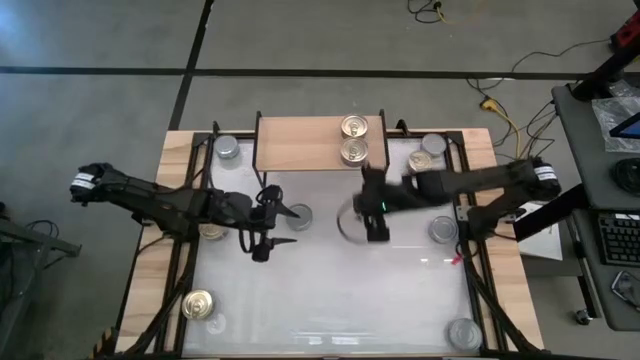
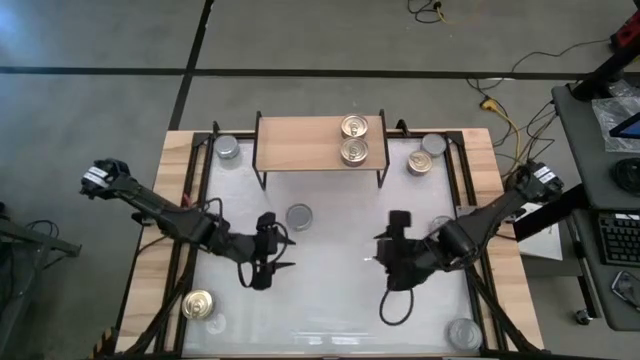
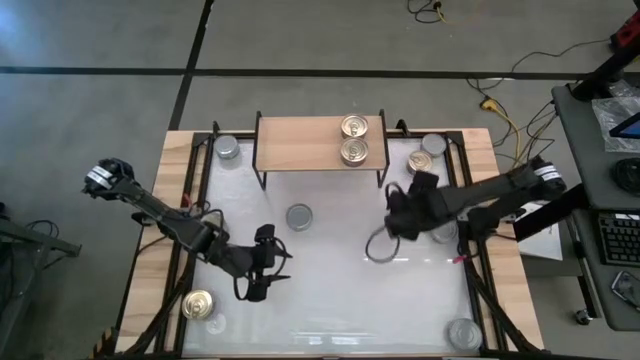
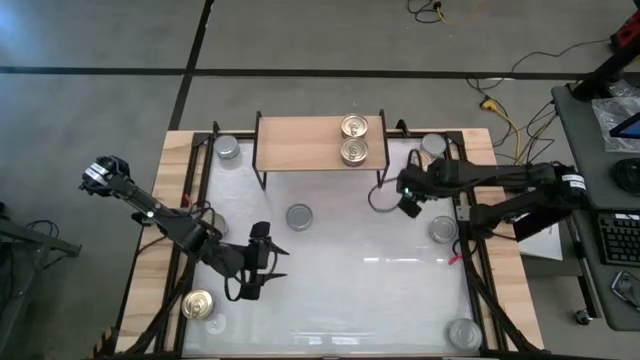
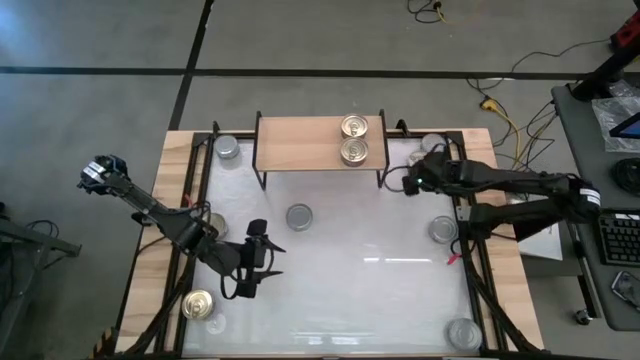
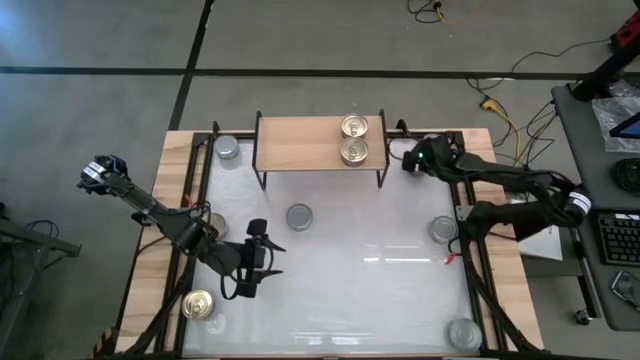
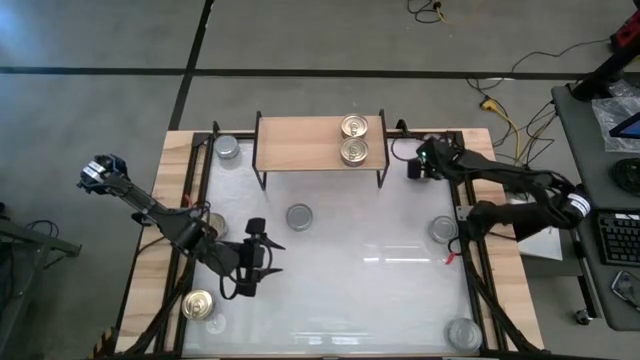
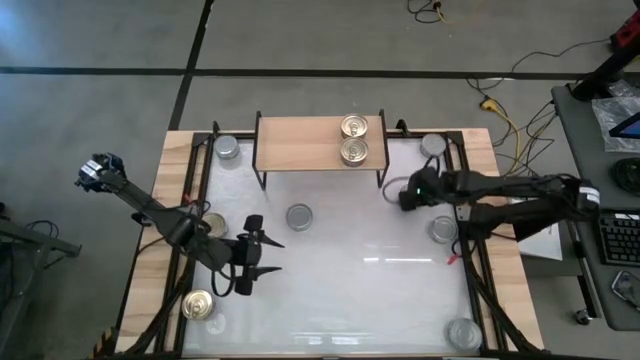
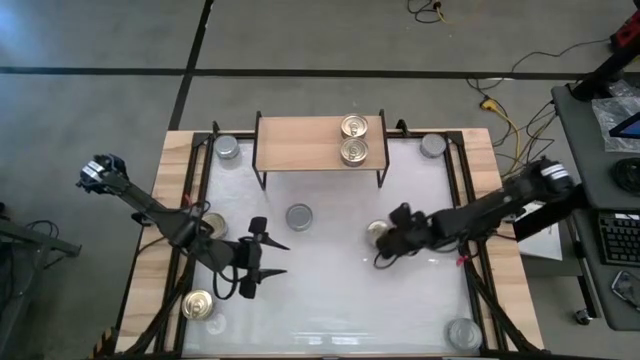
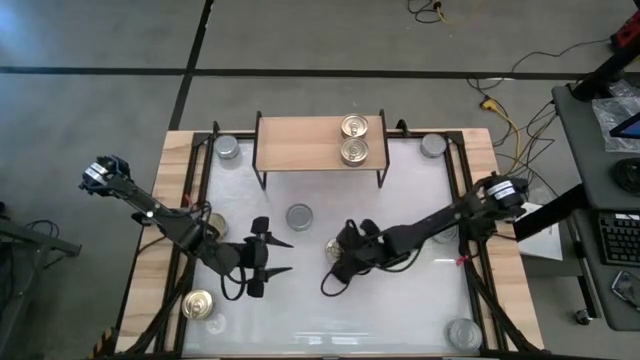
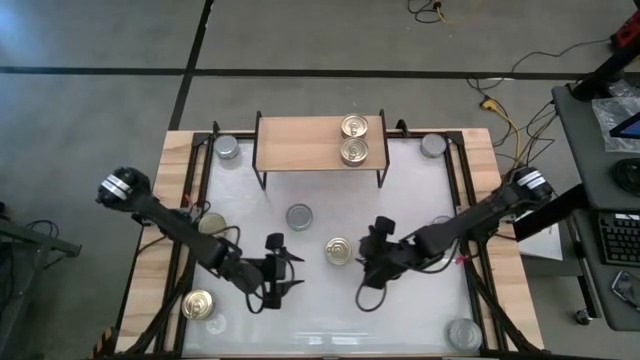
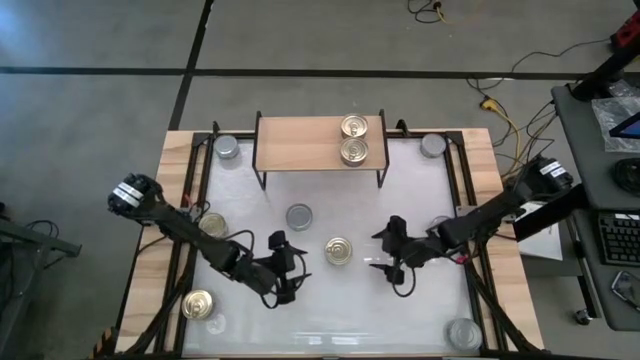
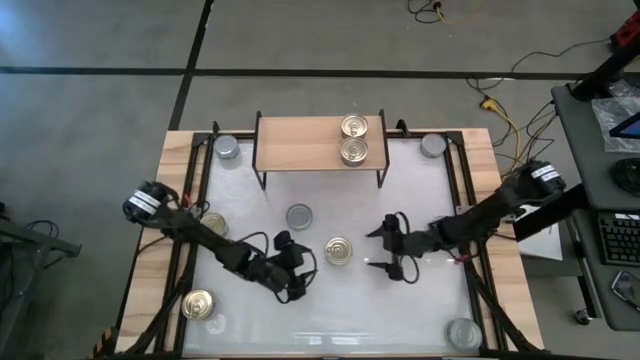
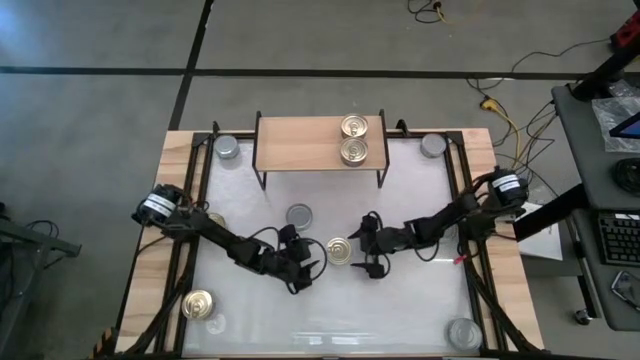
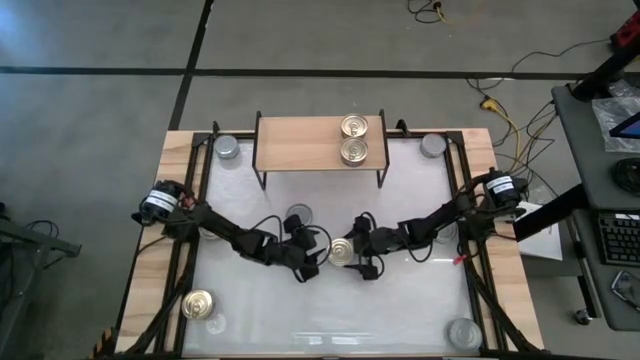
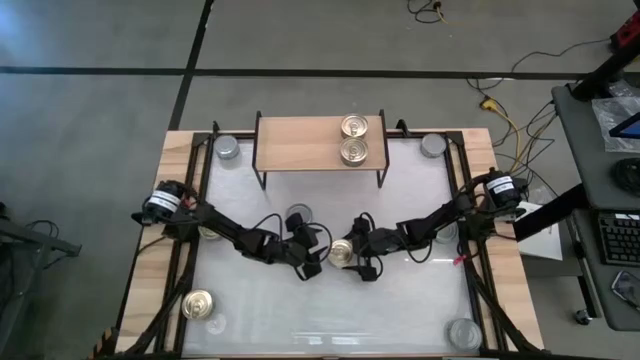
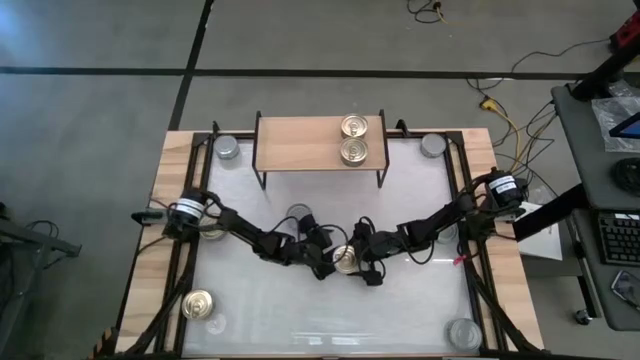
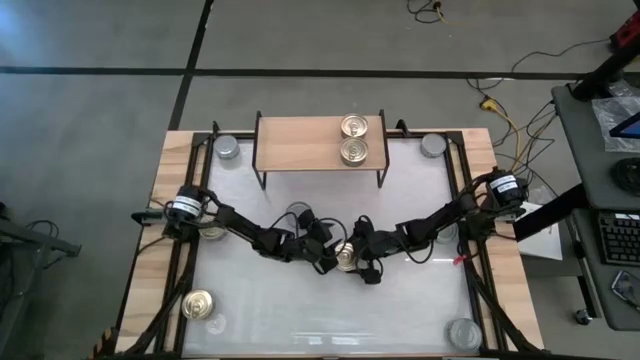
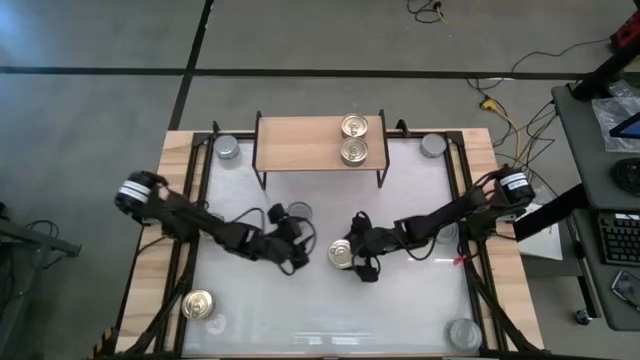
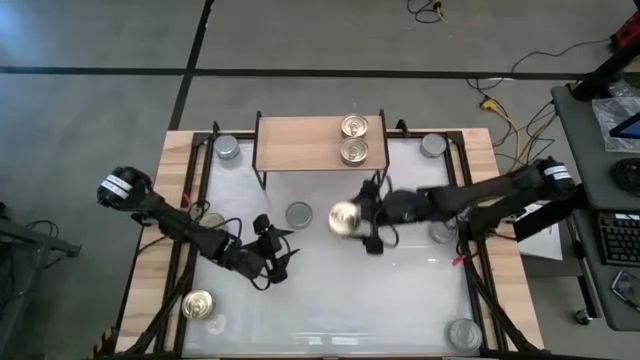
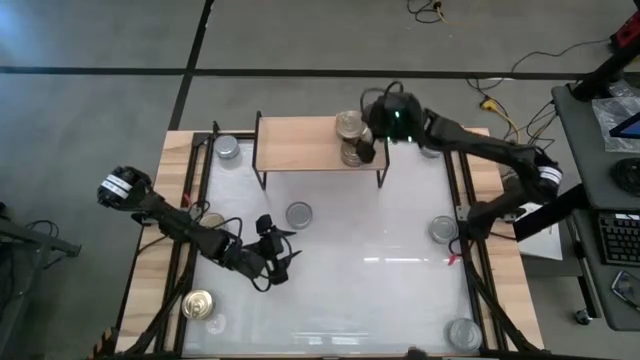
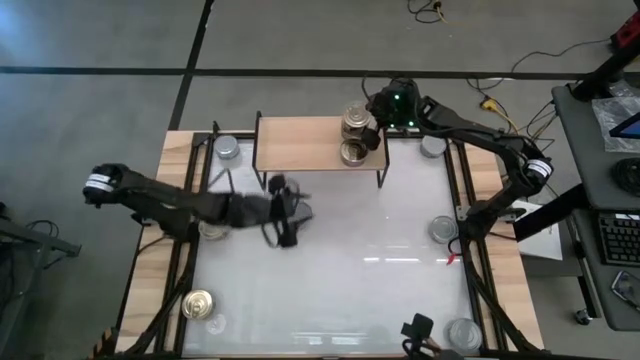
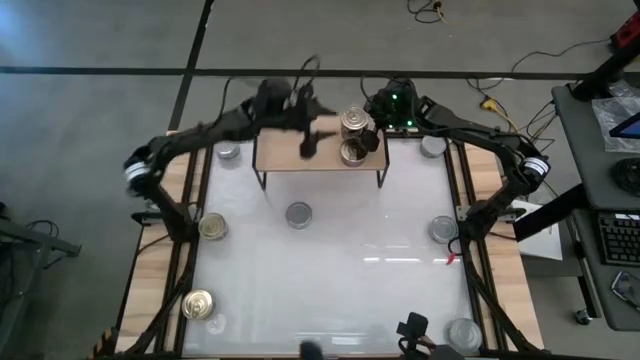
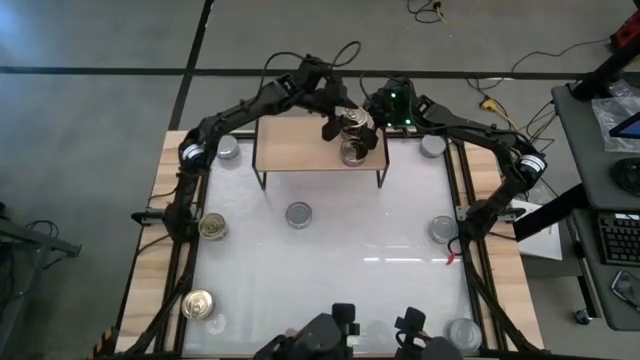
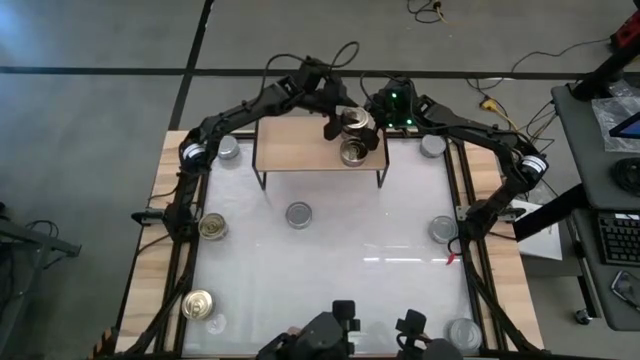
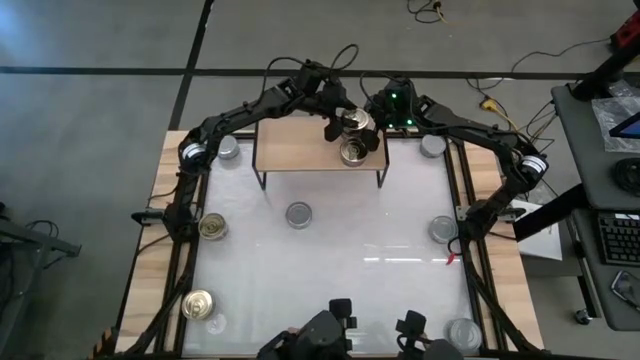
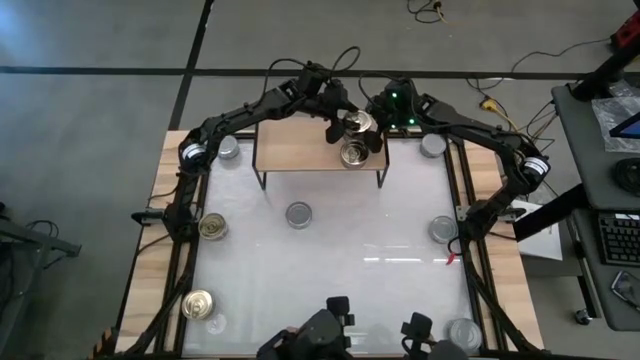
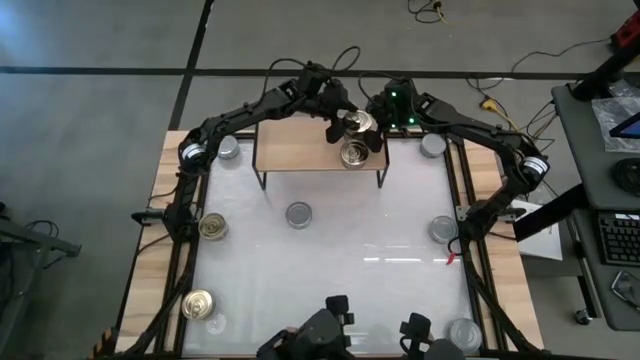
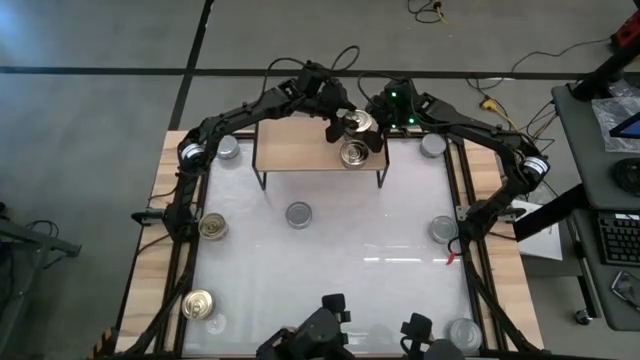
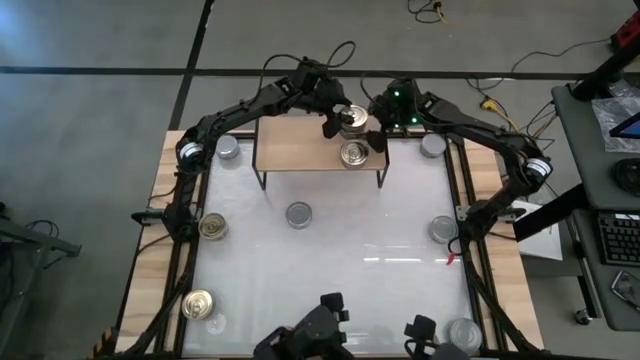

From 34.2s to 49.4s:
Task: Stack canned seafood by type on shelf
Stack the blue-pink tuna can on top of the other blue-pink tuna can on the shelf

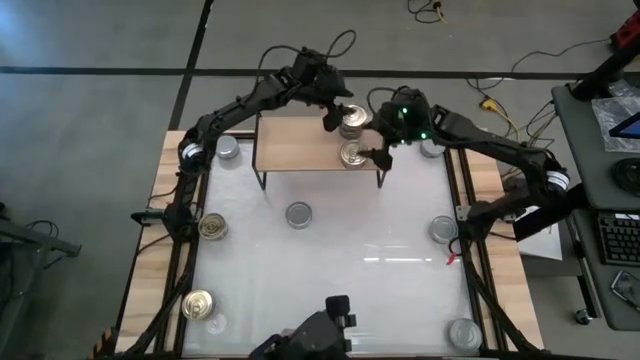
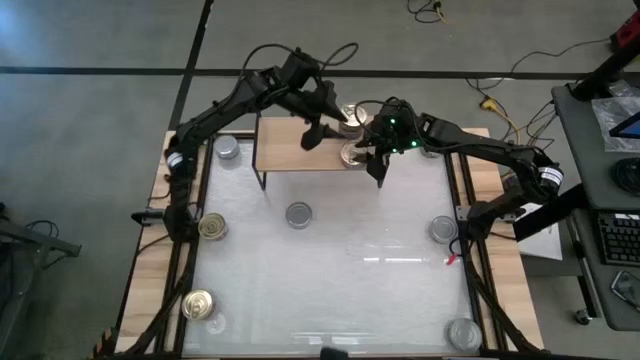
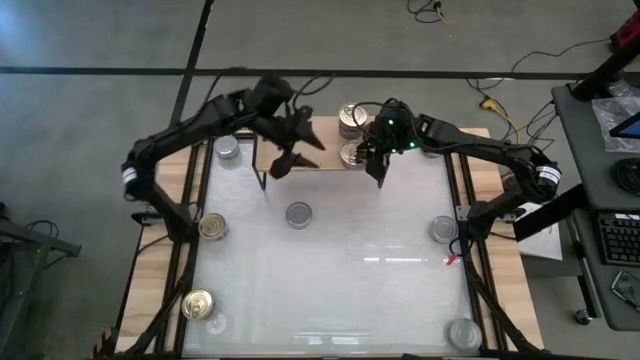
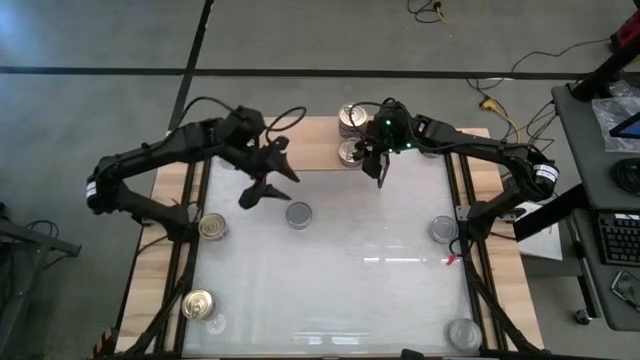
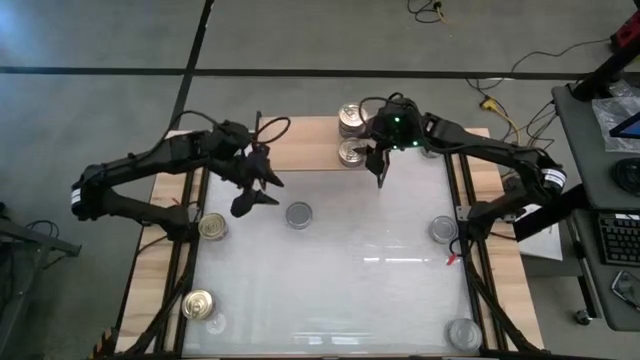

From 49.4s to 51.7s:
Adjust the blue-pink tuna can on the shelf

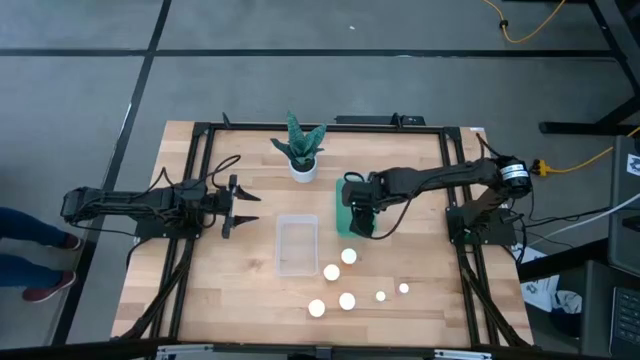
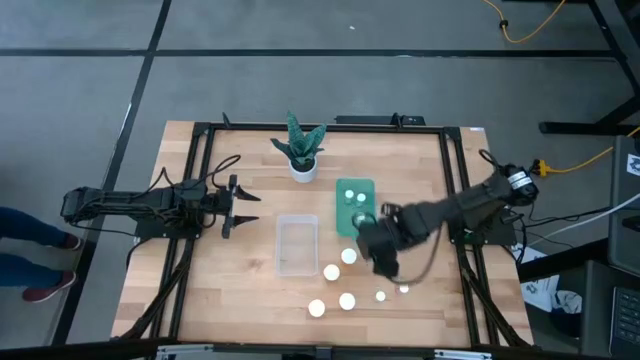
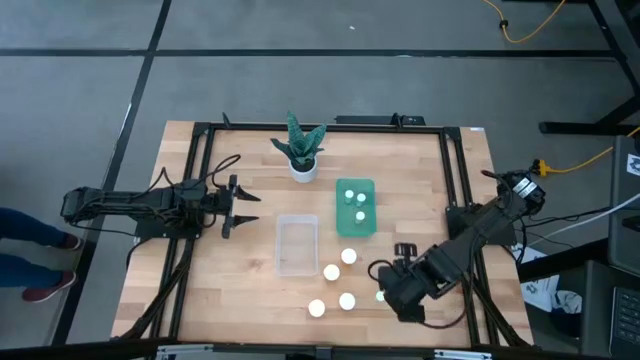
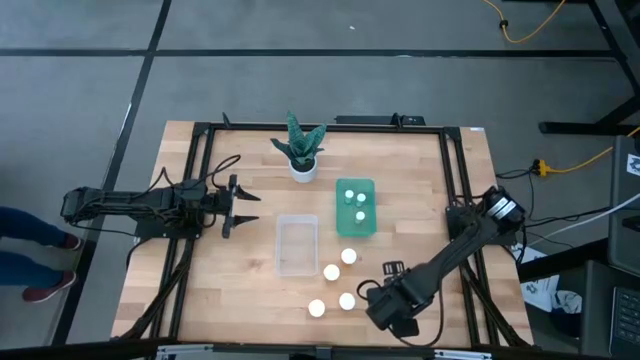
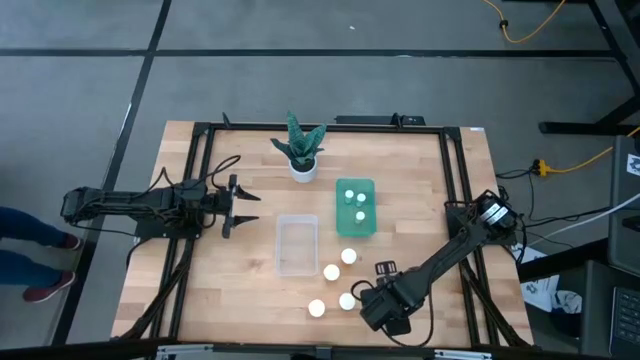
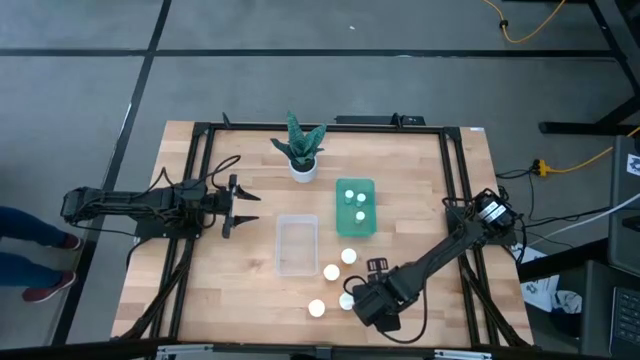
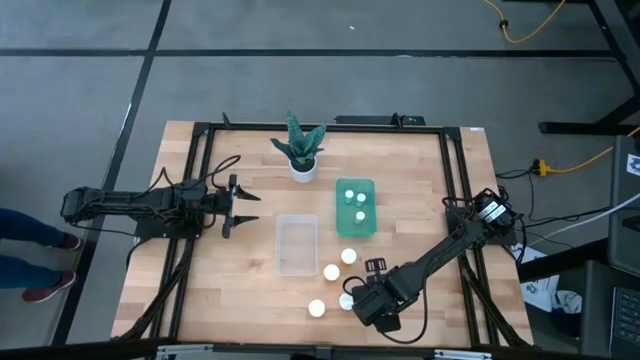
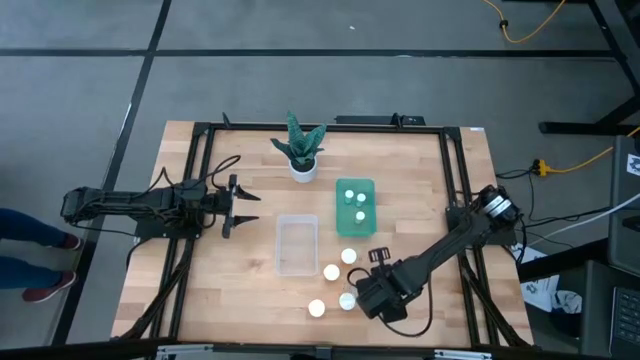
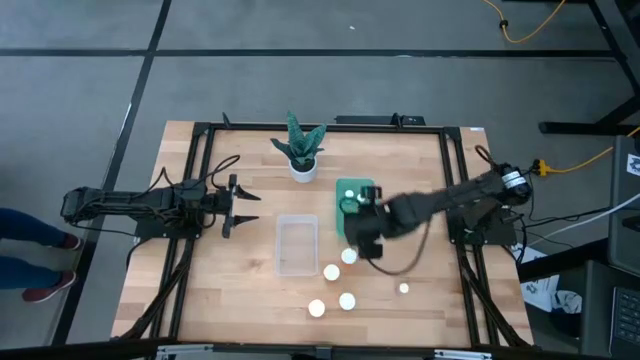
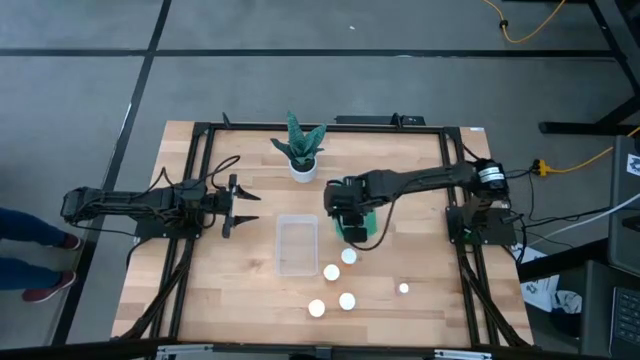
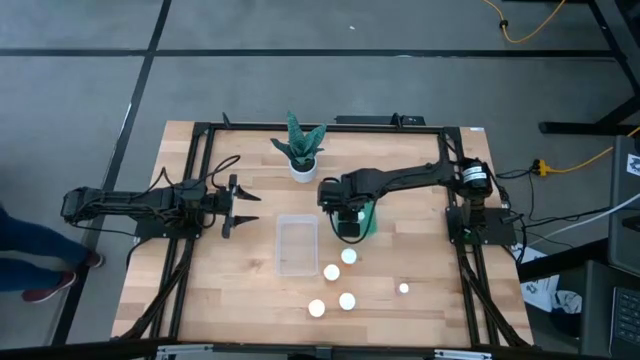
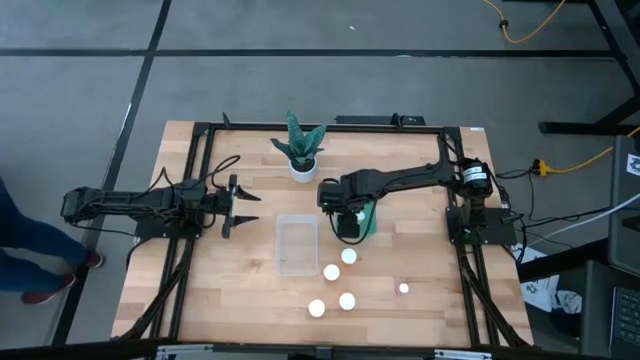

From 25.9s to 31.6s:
Task: Pick and place medicine bottles into bin by pill shape (circle, oval)
Put the small yellow pill bottle into the green bin
